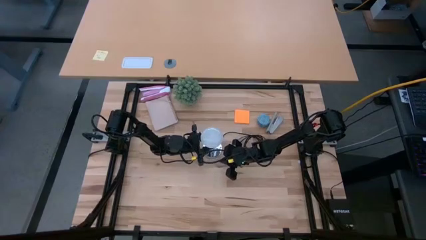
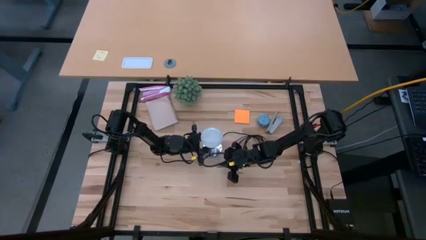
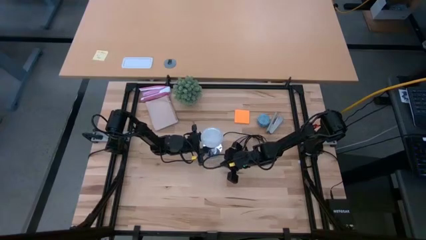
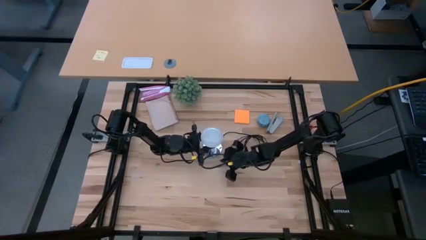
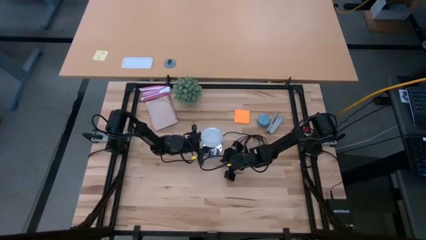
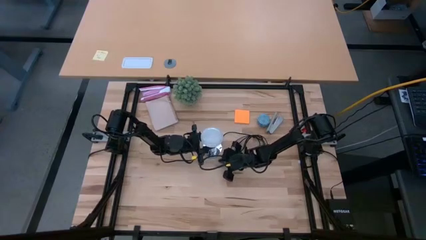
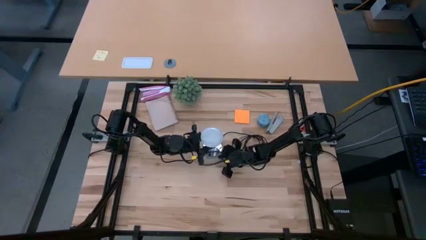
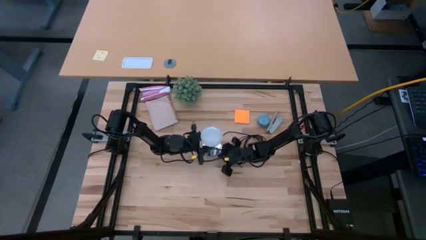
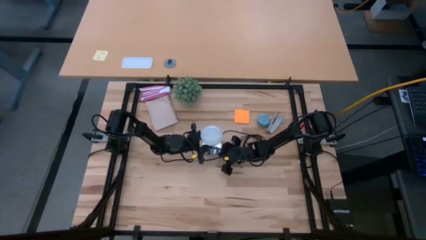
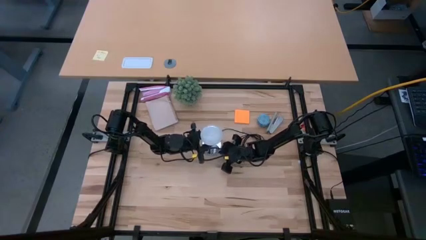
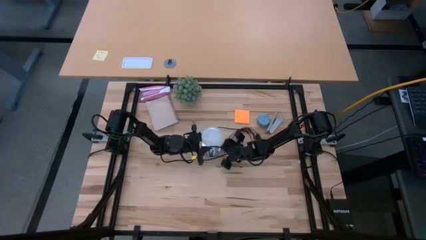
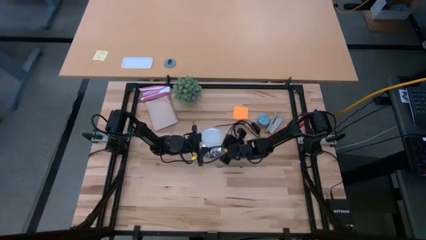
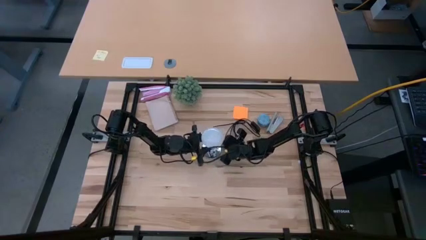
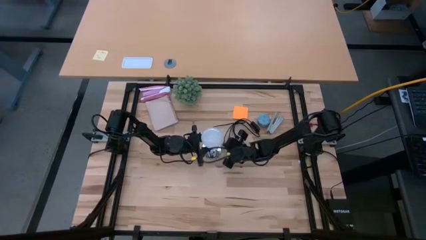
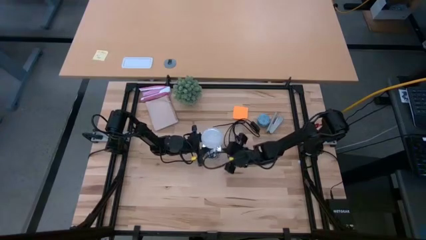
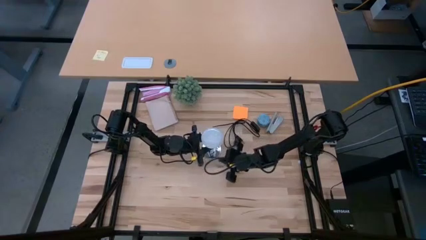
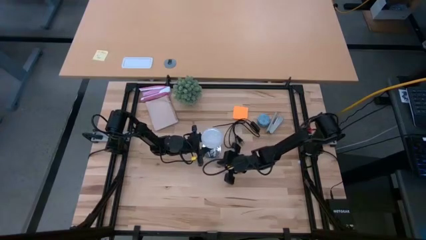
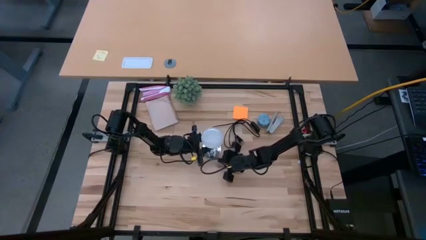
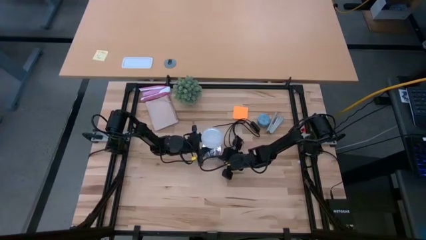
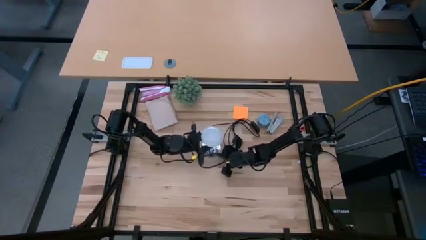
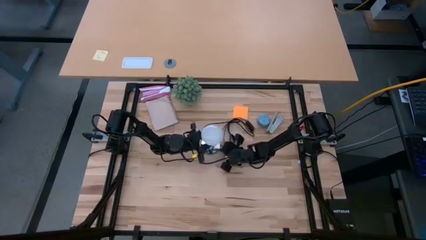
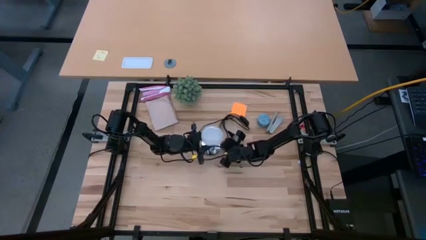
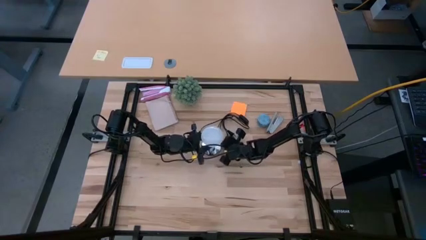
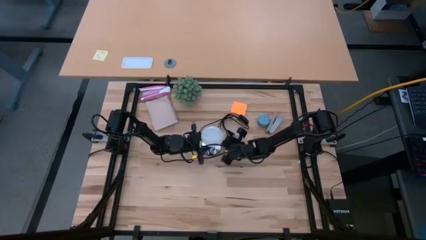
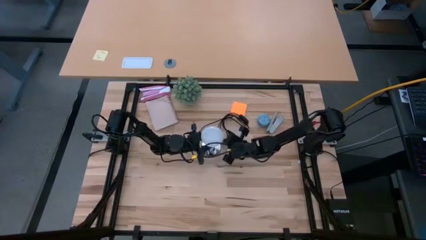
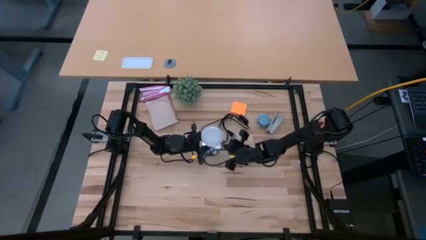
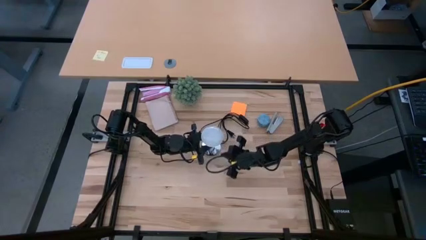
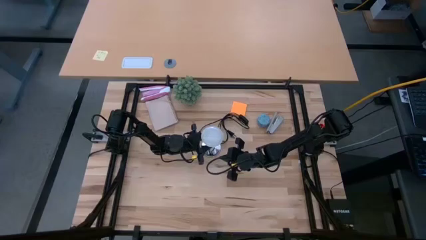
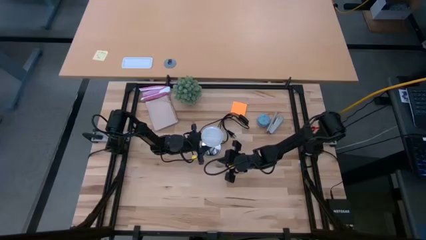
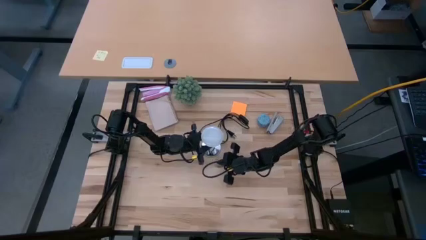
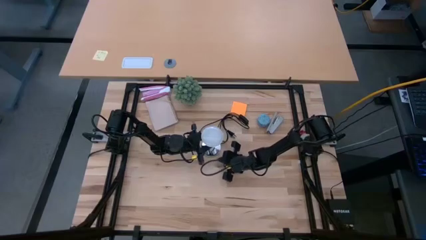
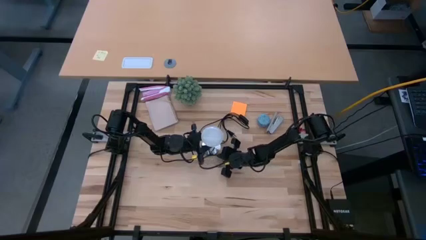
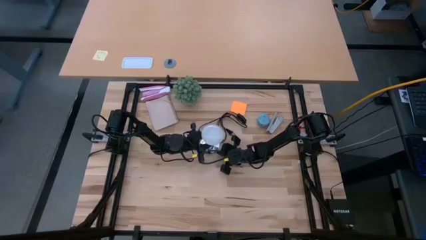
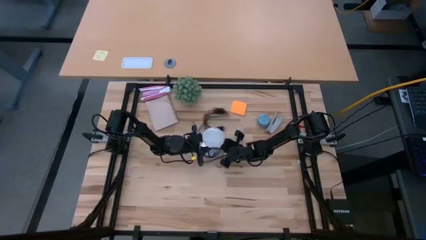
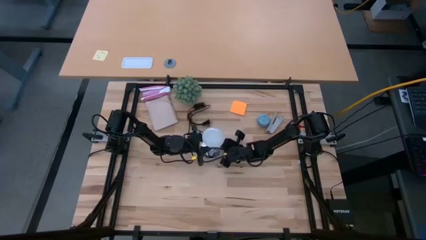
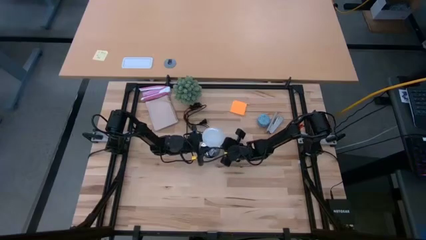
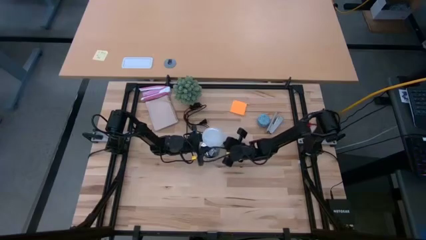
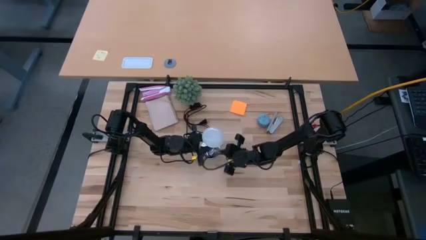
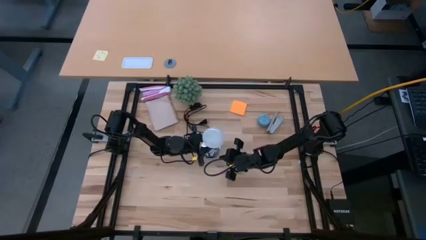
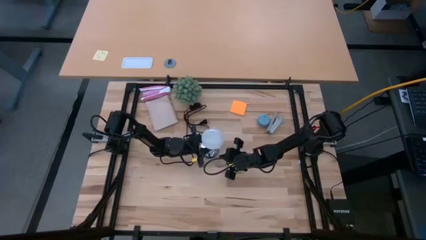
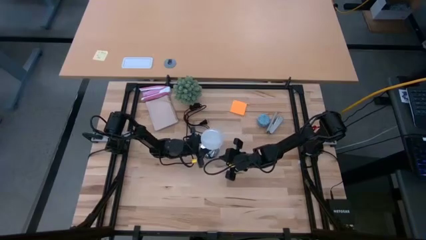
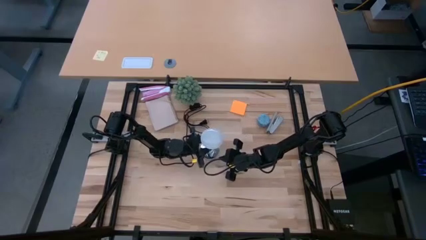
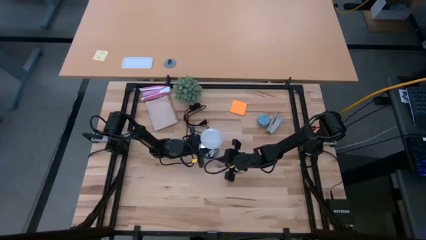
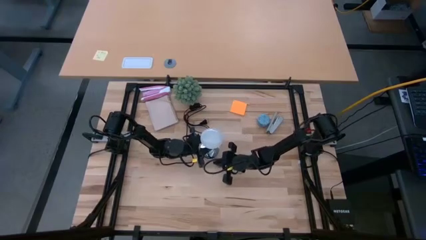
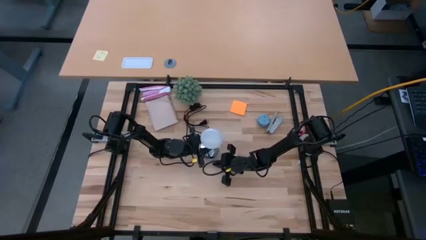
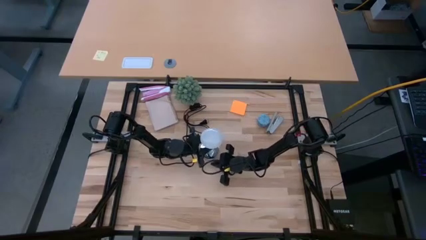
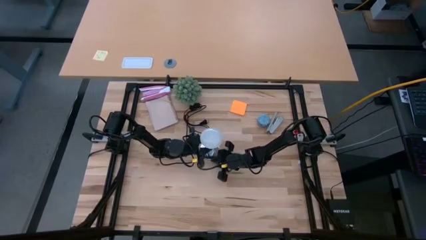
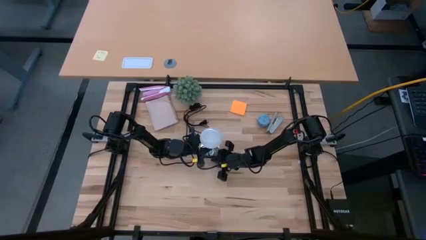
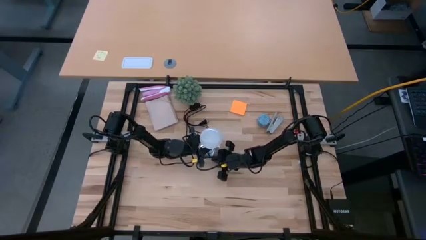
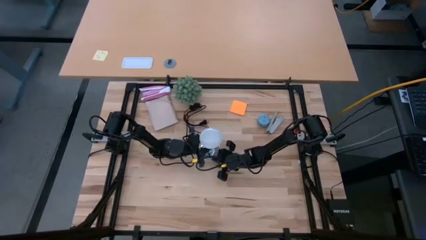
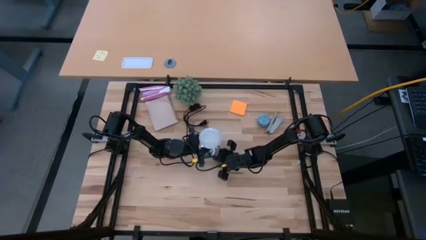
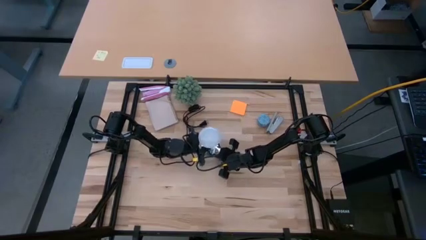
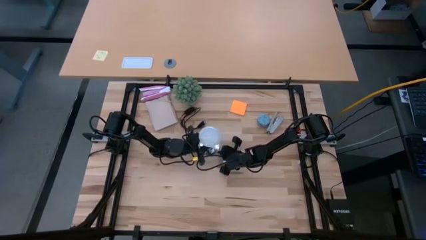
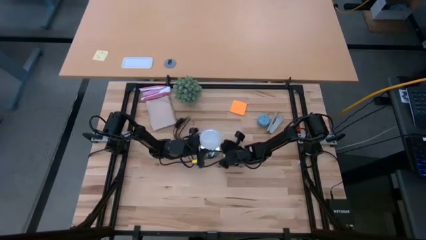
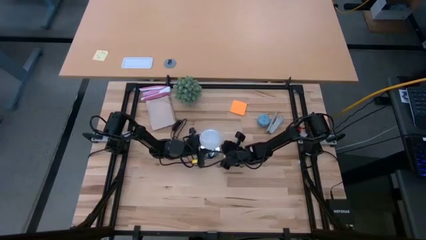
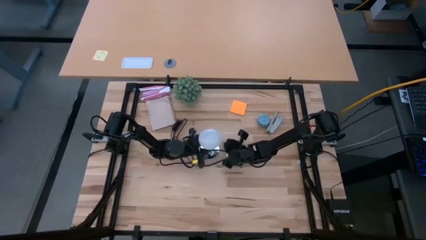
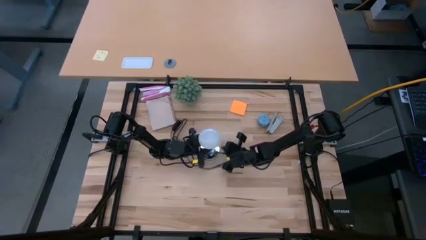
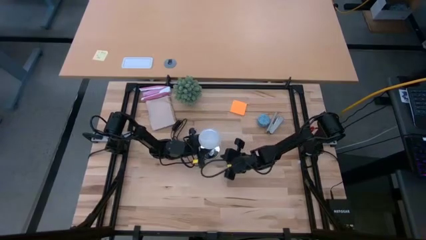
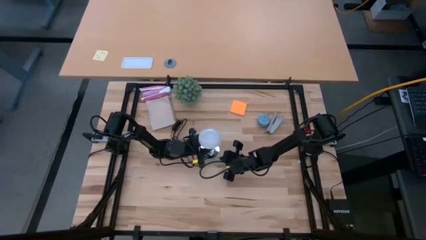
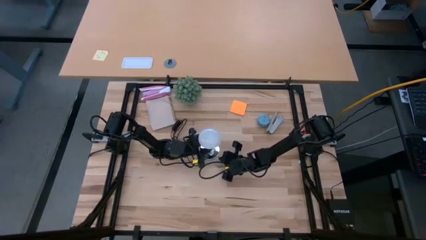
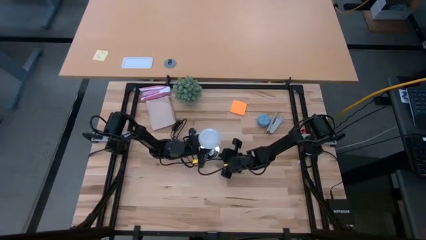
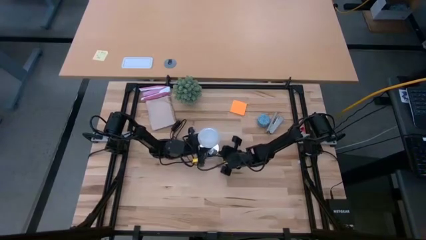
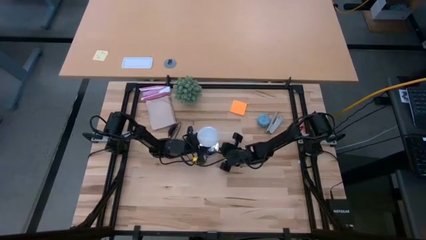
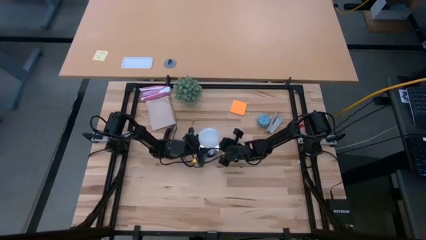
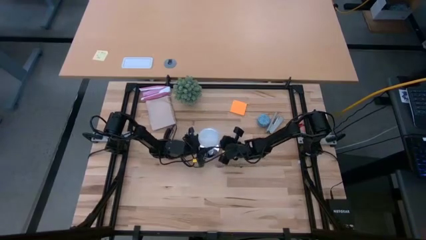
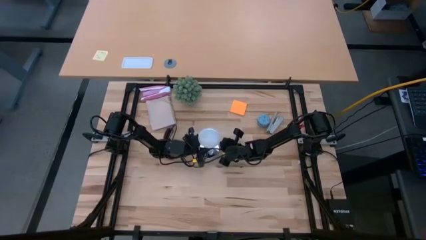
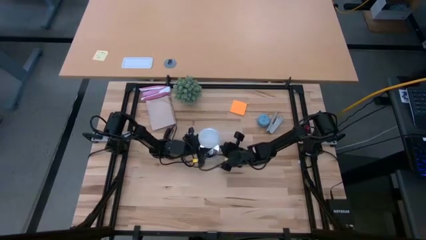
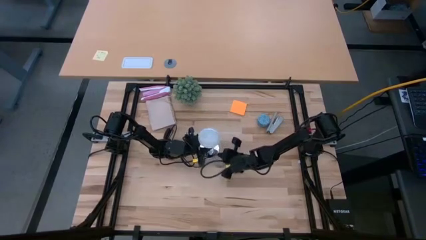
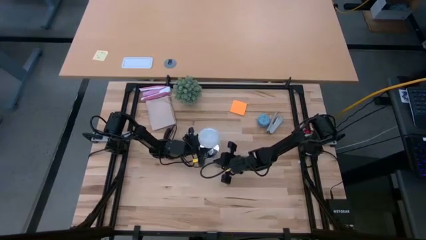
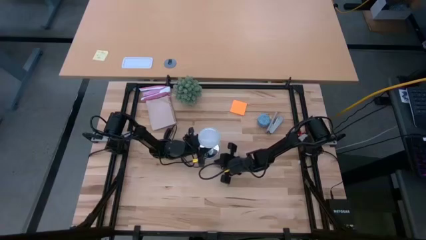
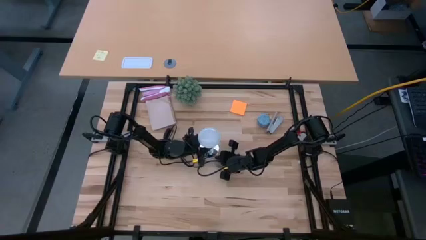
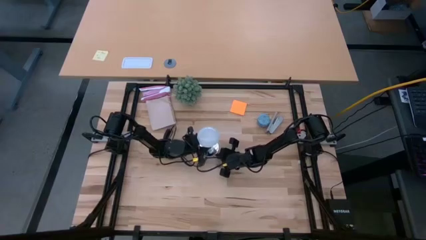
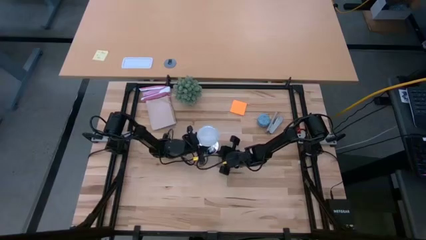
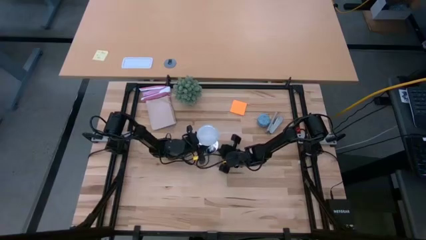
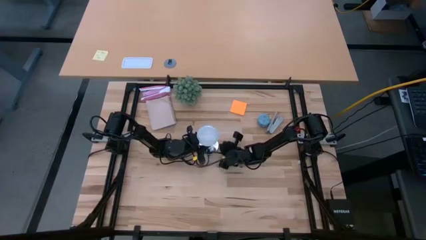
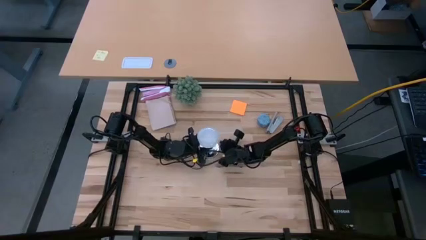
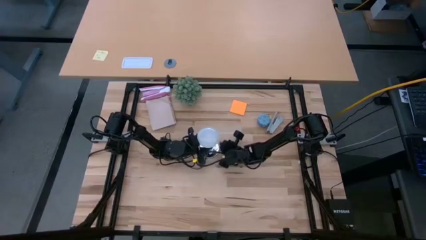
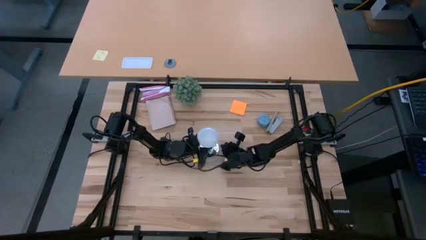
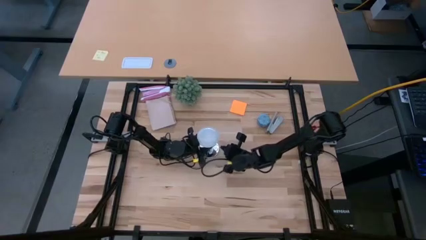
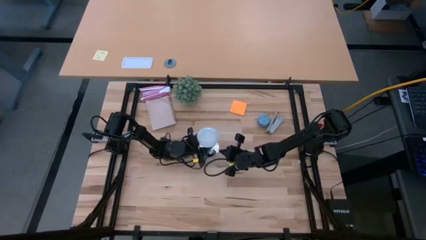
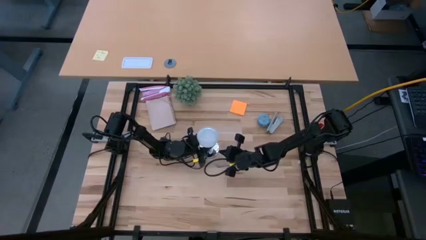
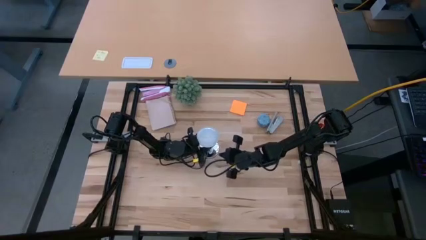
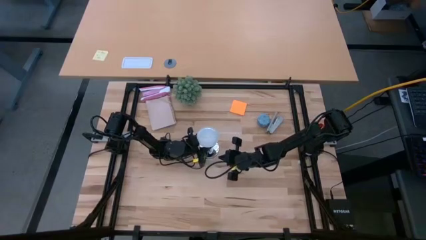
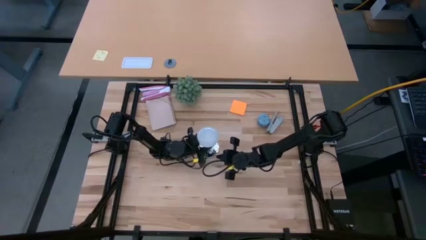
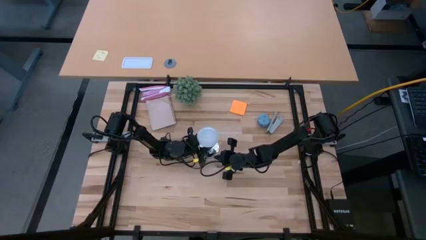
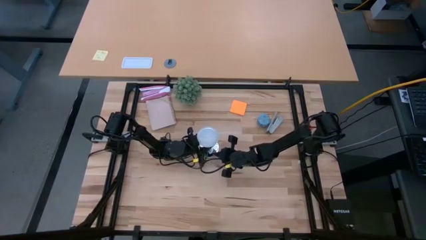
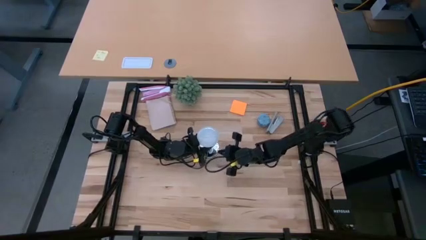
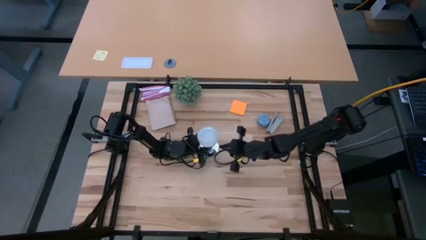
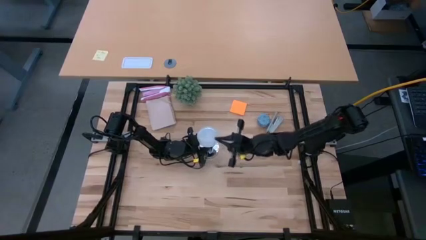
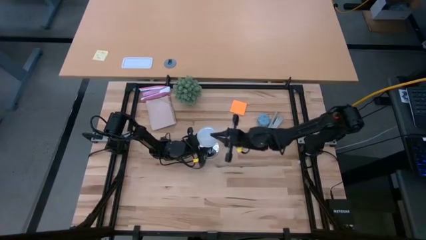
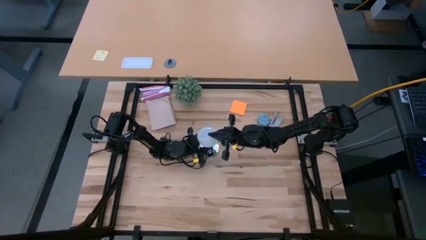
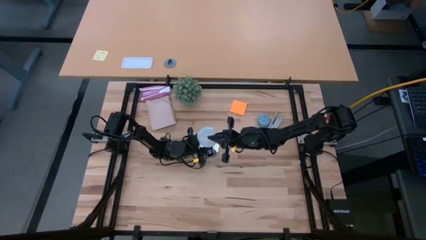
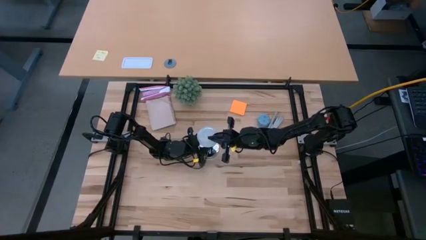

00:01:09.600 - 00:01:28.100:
Task: Screw lightbulb
Insert the white lightbulb into the silver lamp
